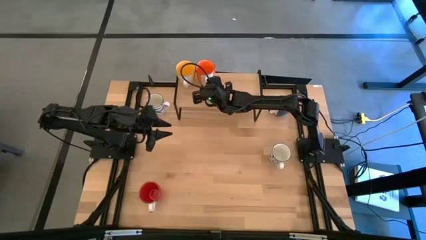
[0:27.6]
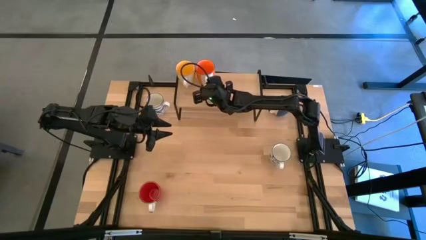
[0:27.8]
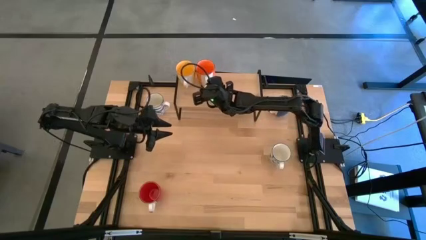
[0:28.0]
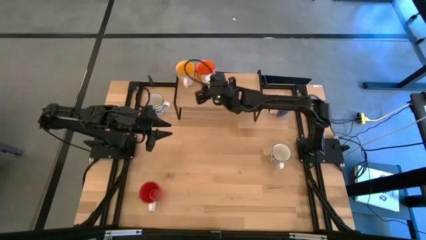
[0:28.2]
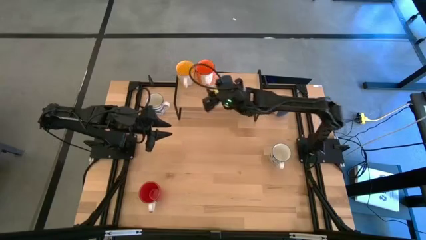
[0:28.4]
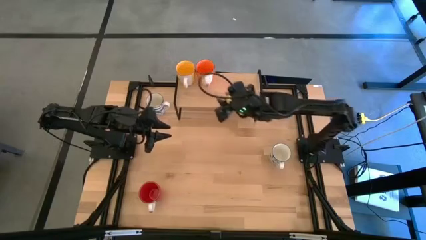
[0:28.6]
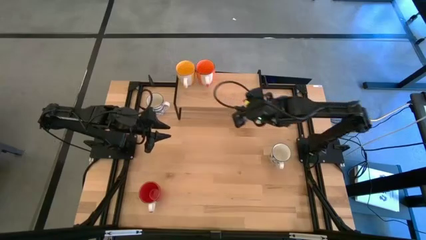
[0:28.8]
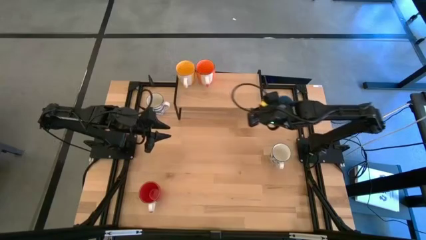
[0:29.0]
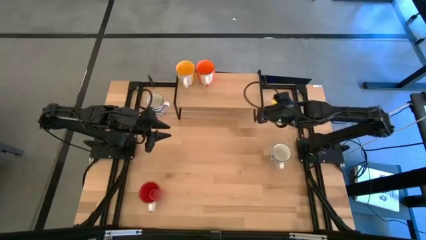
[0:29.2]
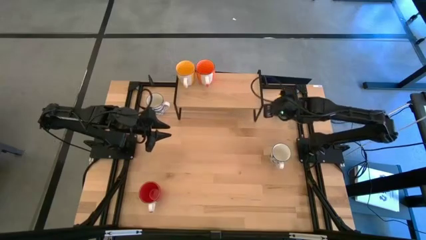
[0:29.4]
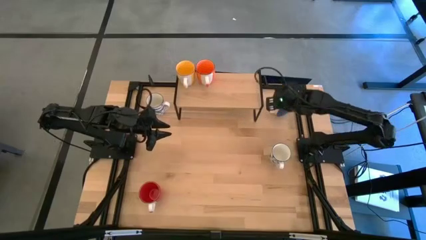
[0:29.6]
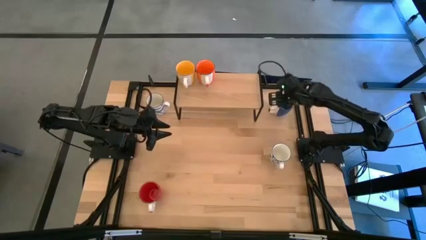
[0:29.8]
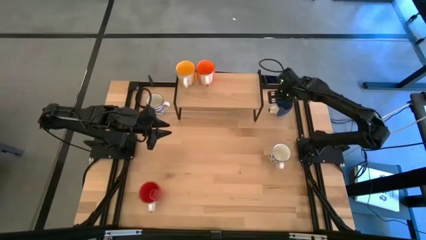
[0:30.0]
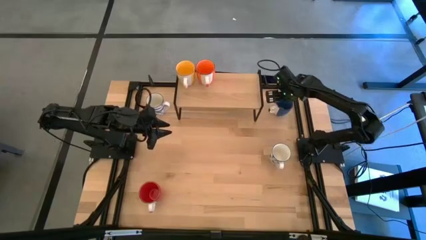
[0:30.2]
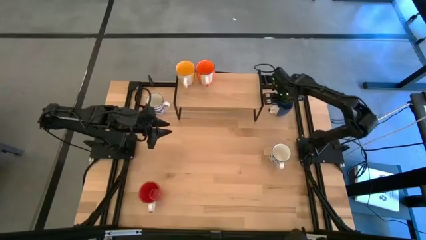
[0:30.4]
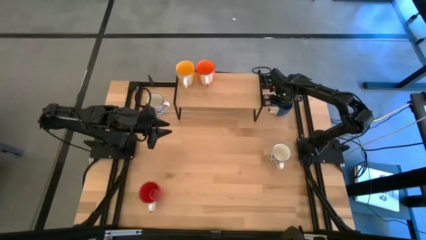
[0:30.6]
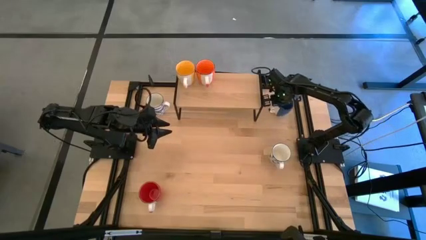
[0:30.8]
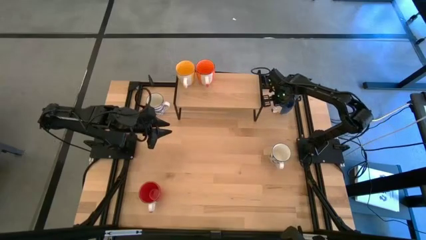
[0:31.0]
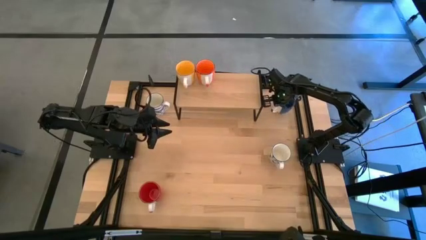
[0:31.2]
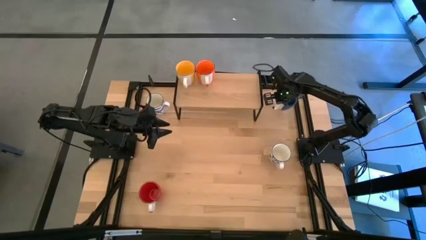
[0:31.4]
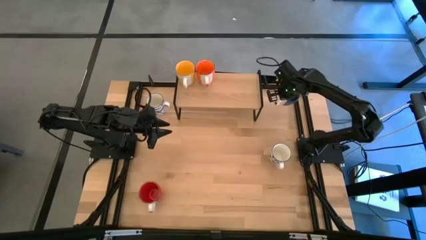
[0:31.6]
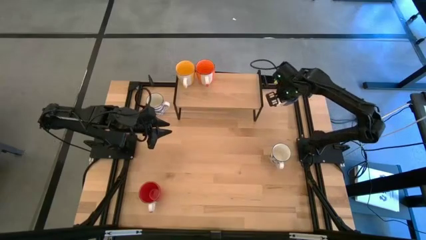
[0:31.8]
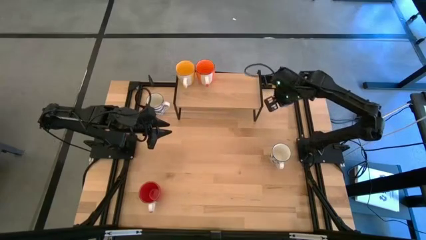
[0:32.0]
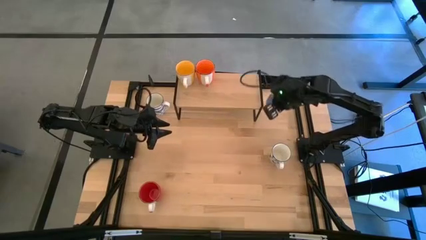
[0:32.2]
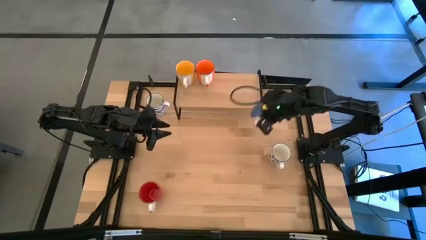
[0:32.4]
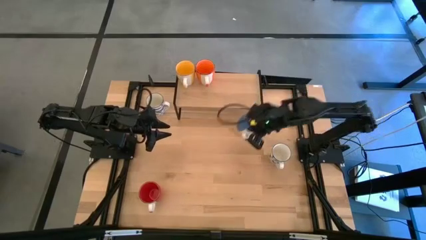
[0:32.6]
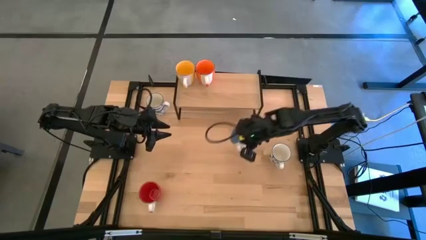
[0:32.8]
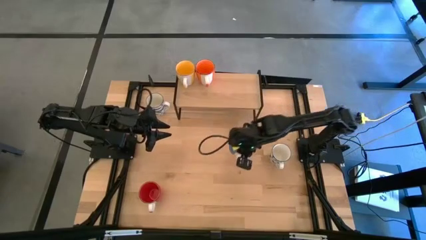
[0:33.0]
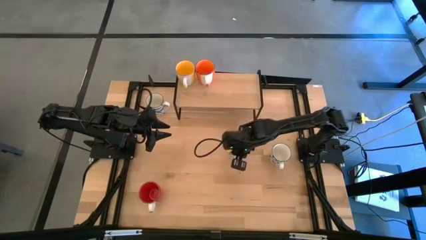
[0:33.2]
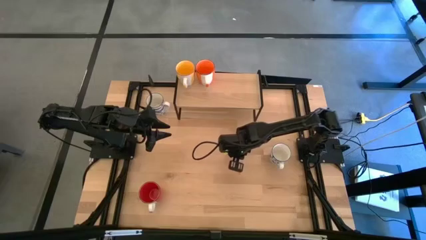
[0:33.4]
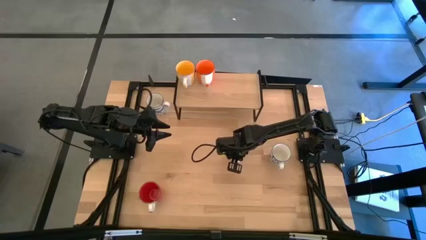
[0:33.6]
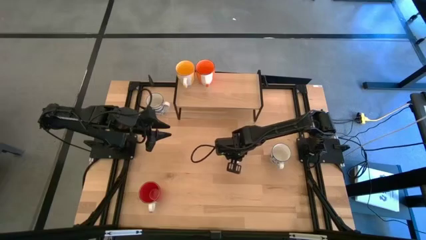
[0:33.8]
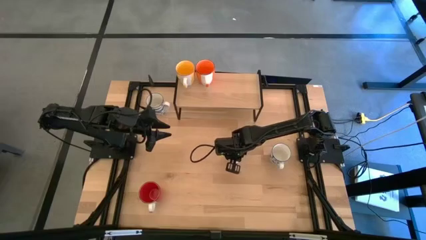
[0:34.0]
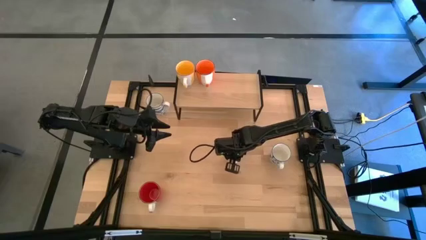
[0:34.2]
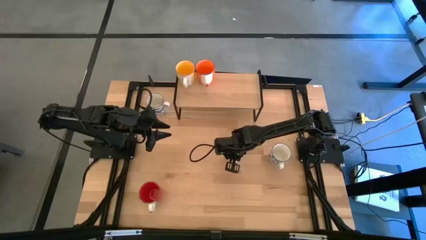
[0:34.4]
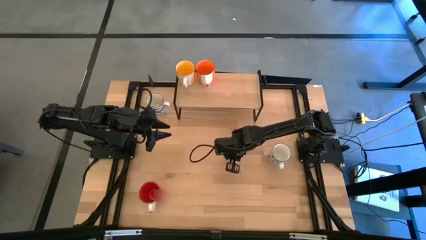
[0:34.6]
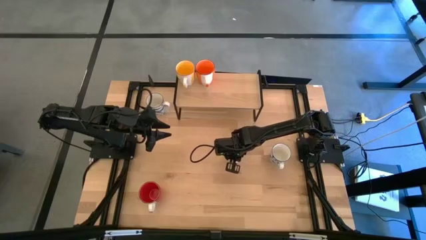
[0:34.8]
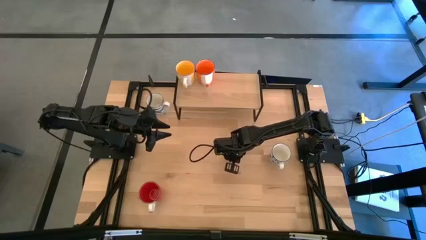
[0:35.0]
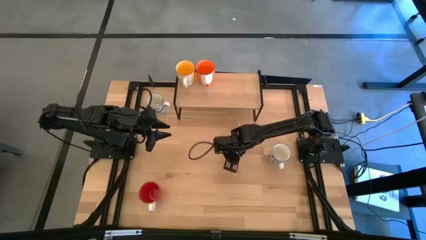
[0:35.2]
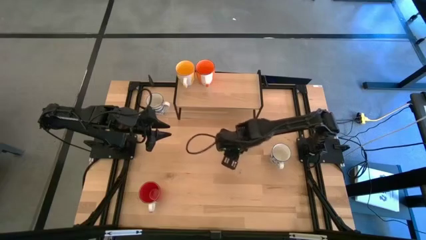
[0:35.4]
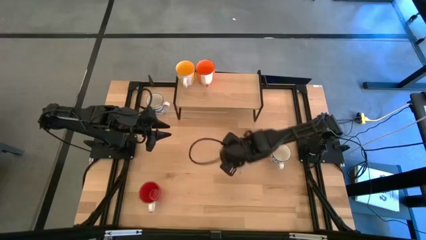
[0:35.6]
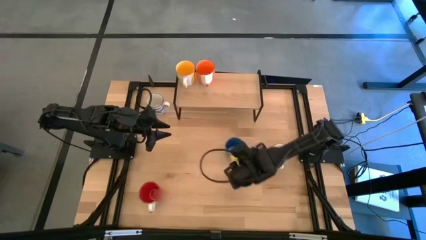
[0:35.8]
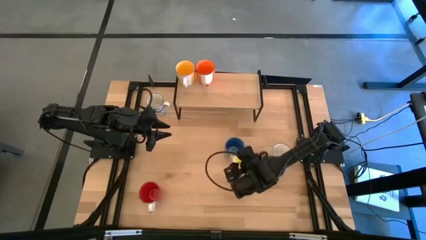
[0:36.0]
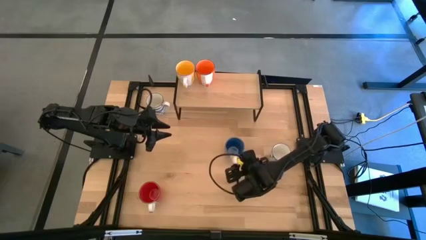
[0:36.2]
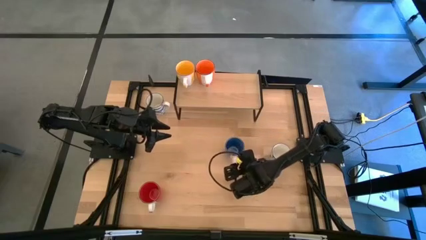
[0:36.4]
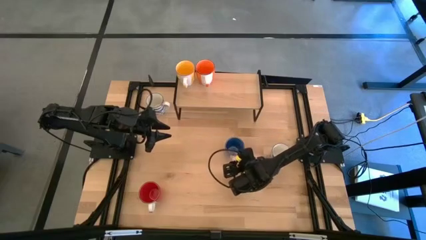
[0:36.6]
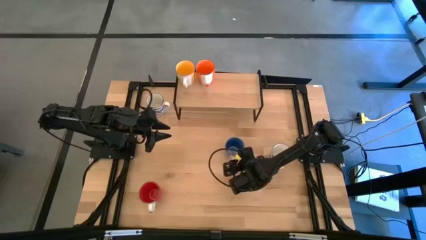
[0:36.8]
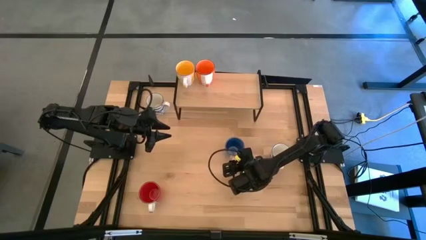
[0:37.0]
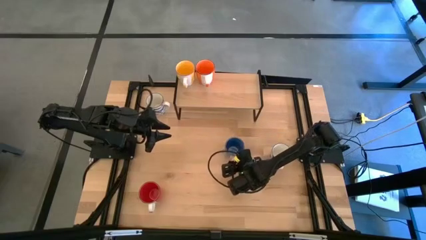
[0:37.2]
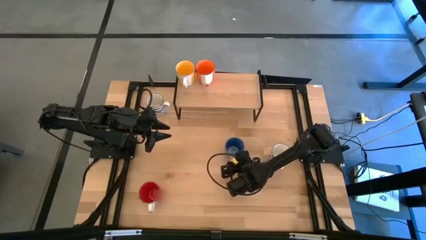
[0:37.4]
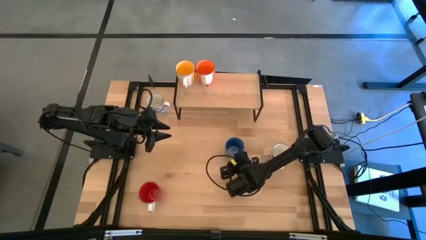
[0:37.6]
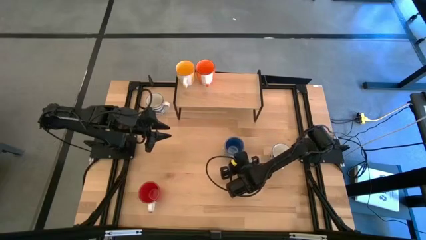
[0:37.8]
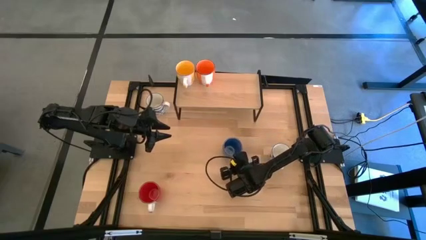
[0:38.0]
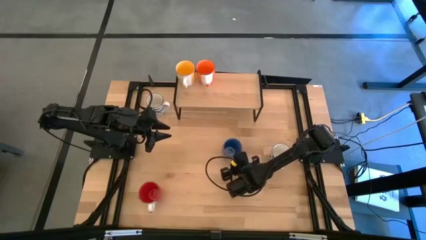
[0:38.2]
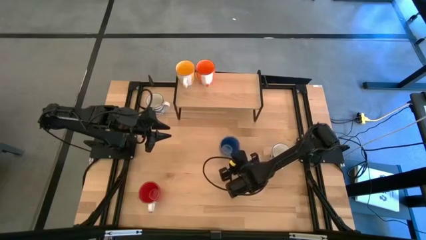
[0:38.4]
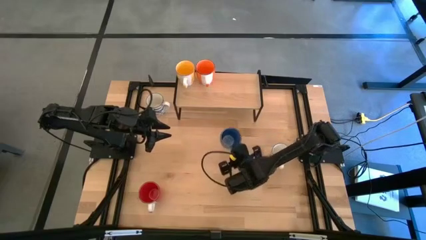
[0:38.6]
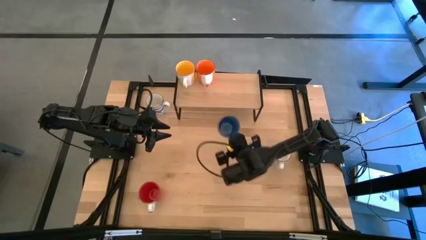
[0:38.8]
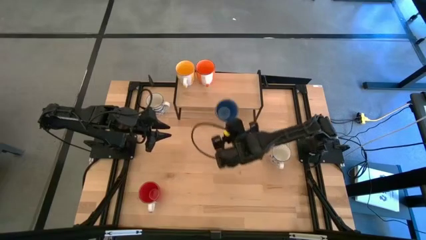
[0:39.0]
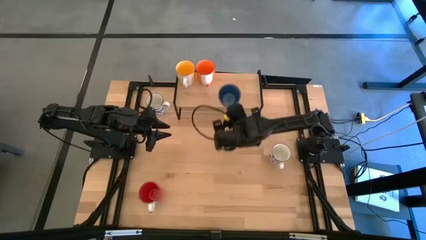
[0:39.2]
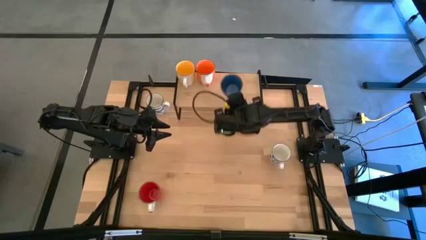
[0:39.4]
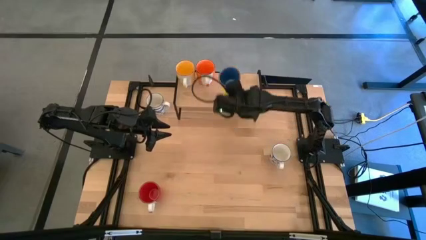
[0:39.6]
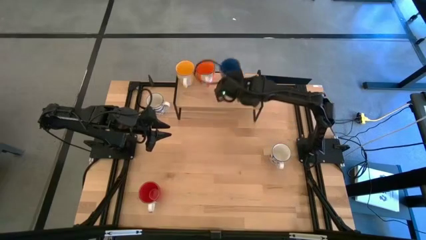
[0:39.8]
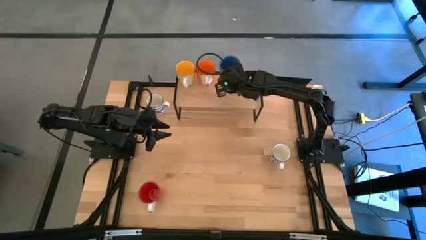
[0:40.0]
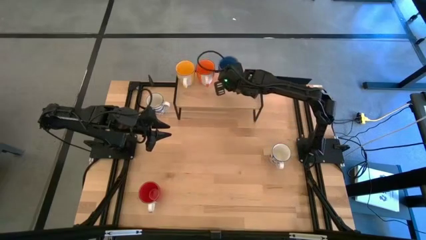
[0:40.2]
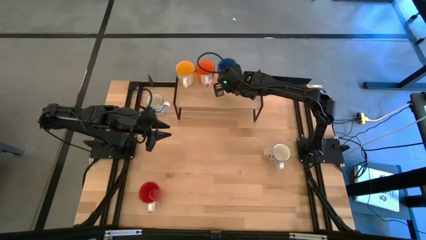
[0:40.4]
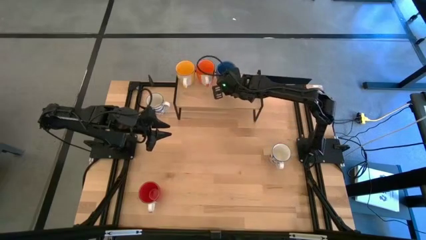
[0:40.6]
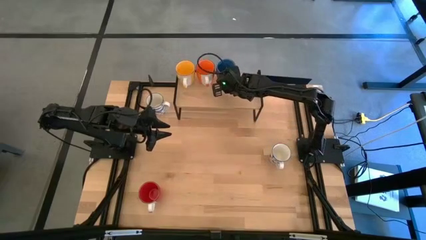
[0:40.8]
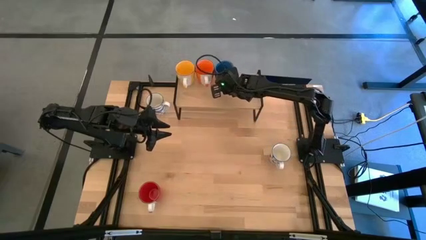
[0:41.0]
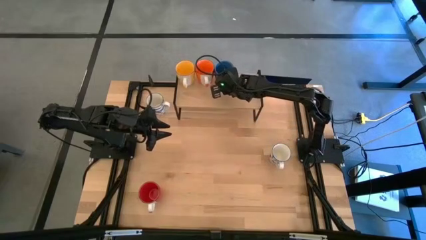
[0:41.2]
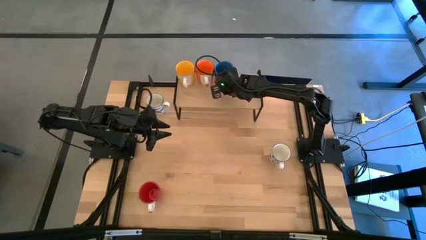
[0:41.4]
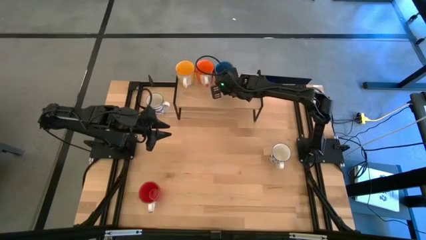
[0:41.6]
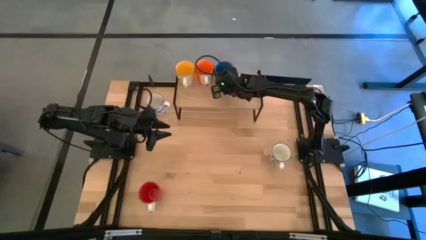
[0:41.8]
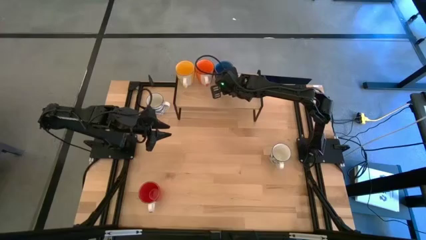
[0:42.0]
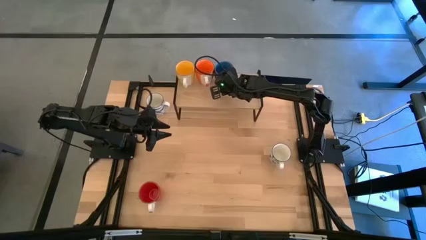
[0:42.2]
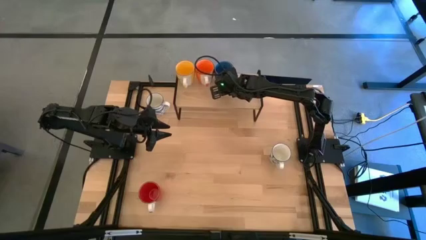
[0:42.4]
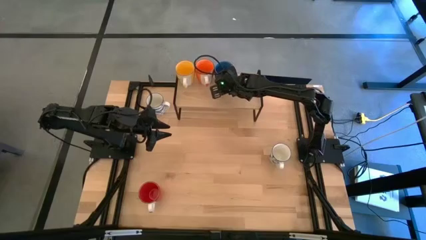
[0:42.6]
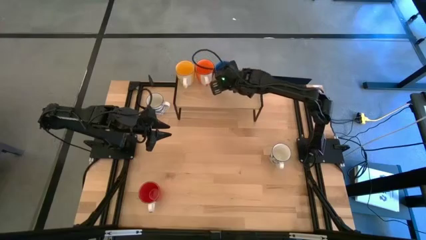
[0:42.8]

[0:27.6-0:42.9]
Task: Place coffee mugs
Put the blue mug on the shelf
